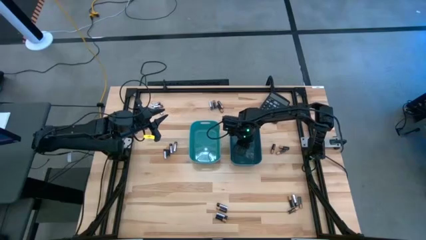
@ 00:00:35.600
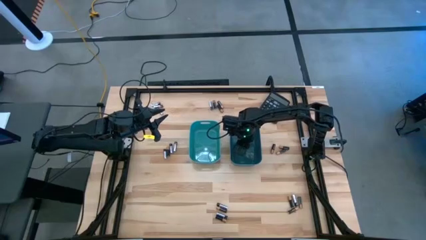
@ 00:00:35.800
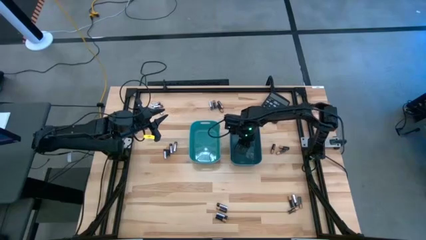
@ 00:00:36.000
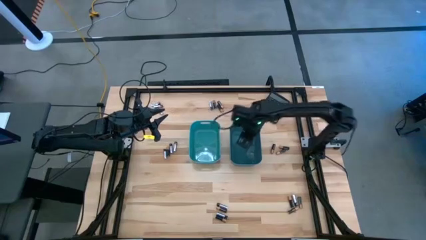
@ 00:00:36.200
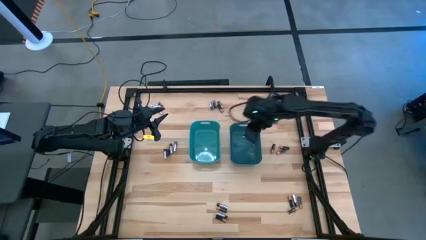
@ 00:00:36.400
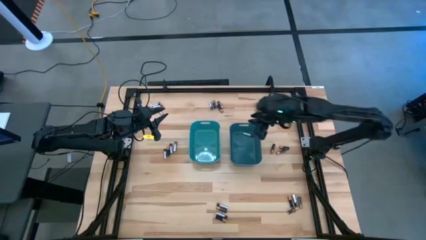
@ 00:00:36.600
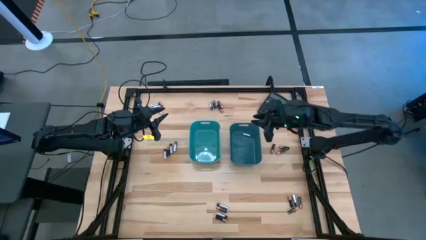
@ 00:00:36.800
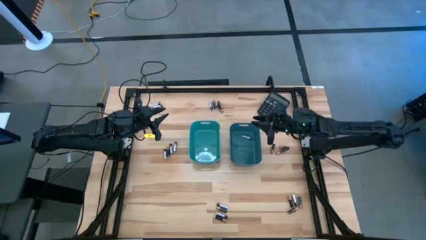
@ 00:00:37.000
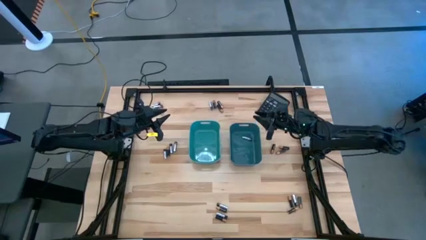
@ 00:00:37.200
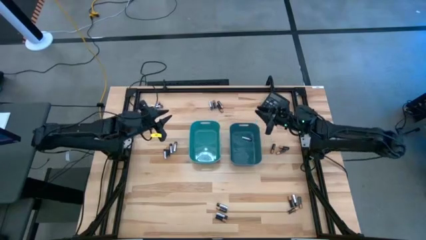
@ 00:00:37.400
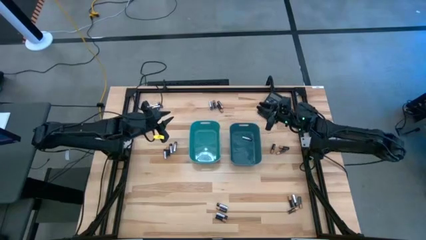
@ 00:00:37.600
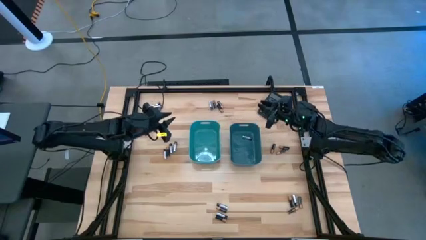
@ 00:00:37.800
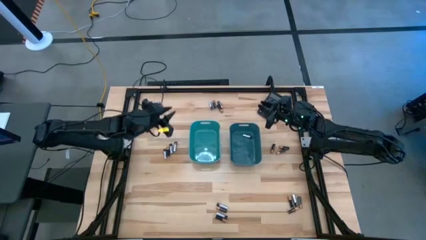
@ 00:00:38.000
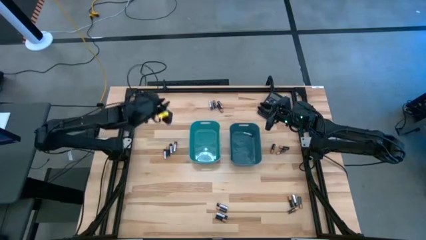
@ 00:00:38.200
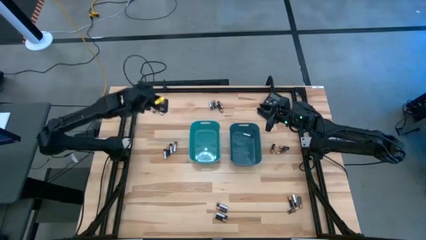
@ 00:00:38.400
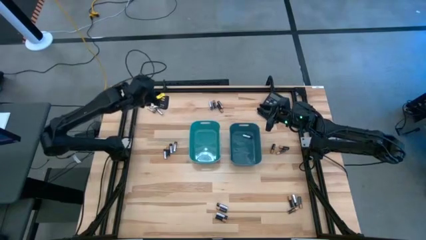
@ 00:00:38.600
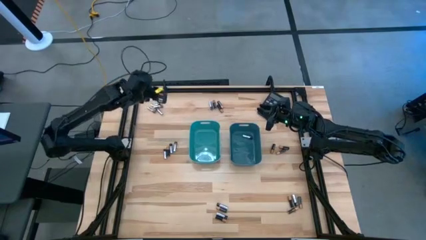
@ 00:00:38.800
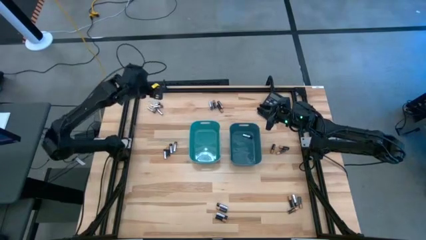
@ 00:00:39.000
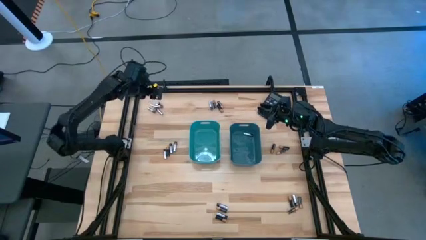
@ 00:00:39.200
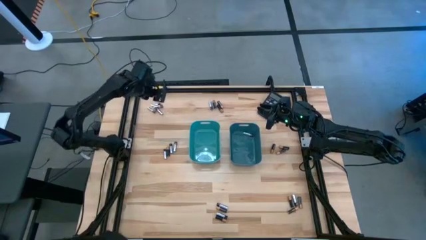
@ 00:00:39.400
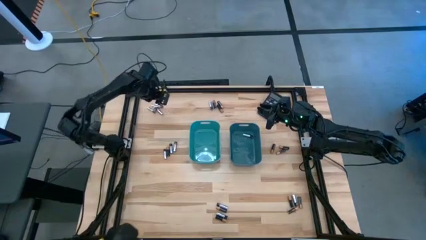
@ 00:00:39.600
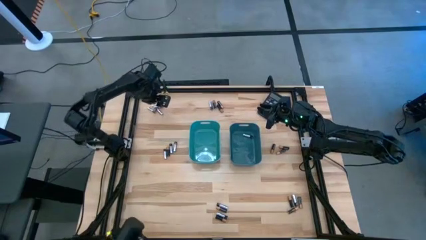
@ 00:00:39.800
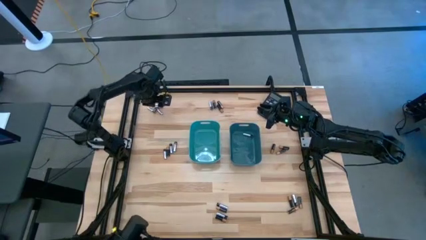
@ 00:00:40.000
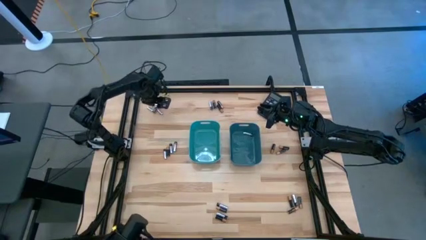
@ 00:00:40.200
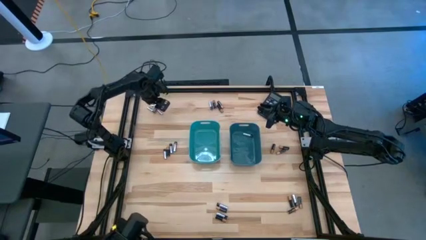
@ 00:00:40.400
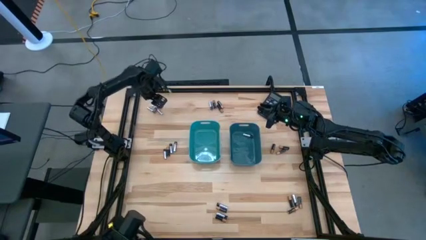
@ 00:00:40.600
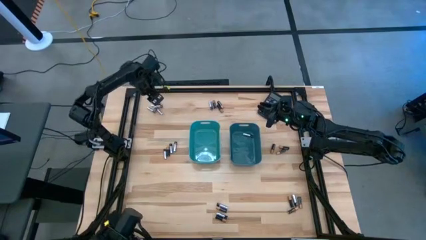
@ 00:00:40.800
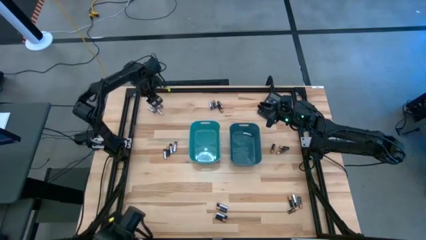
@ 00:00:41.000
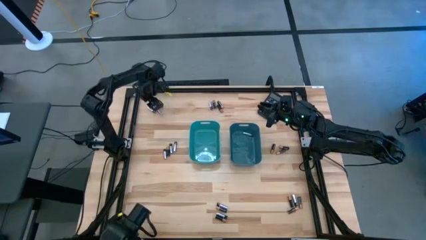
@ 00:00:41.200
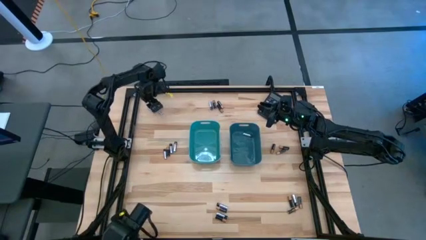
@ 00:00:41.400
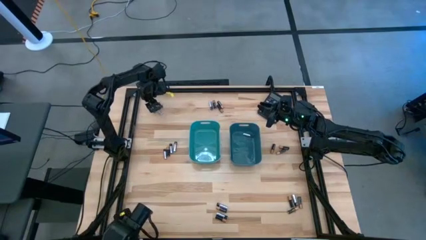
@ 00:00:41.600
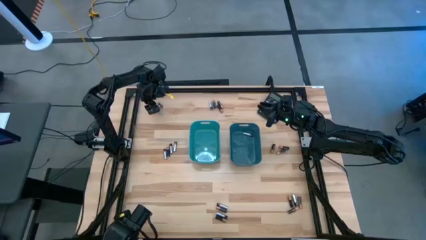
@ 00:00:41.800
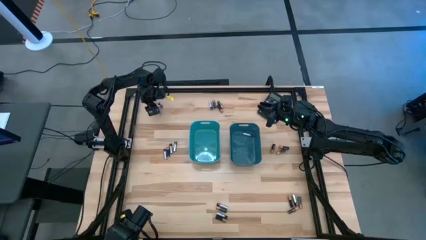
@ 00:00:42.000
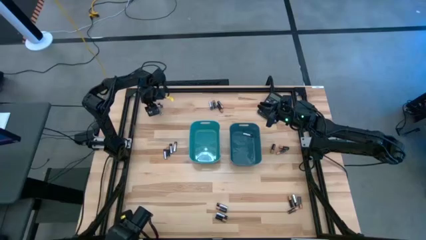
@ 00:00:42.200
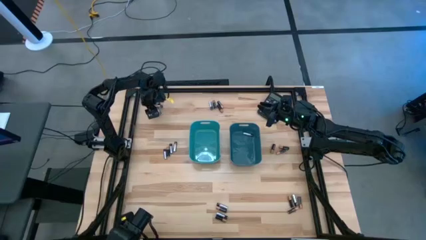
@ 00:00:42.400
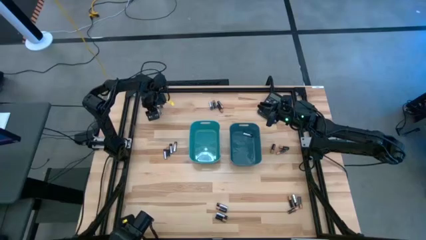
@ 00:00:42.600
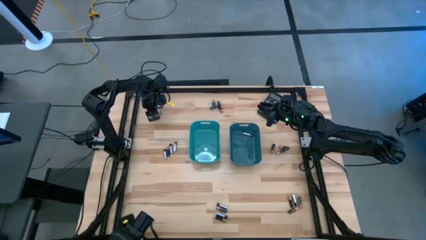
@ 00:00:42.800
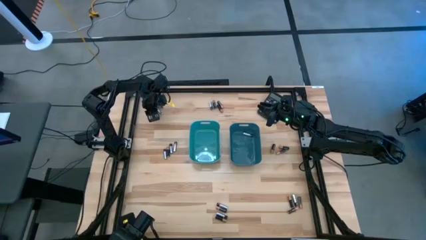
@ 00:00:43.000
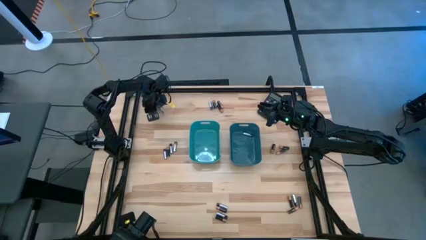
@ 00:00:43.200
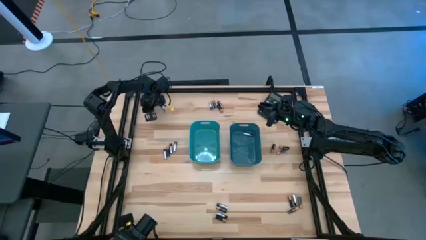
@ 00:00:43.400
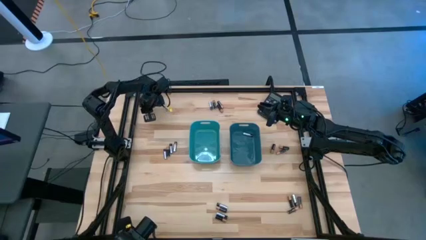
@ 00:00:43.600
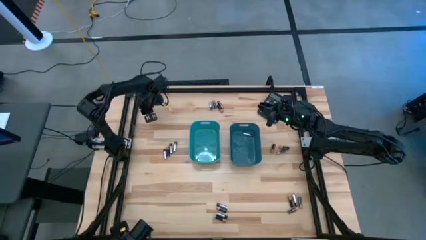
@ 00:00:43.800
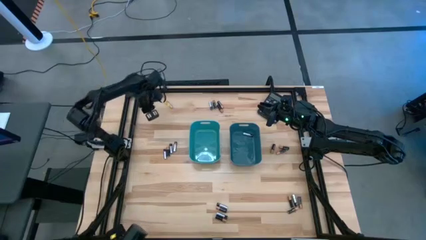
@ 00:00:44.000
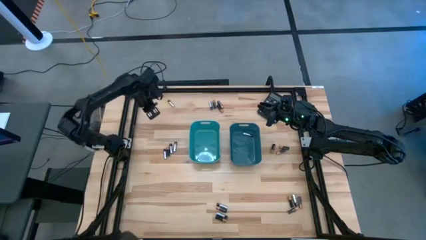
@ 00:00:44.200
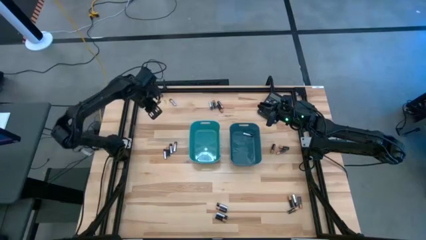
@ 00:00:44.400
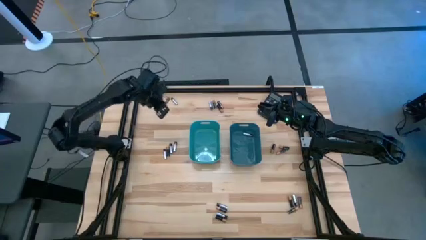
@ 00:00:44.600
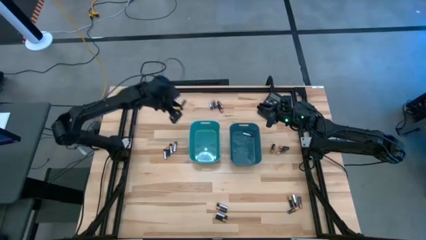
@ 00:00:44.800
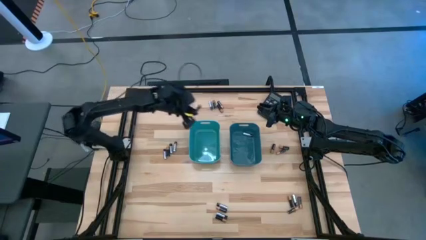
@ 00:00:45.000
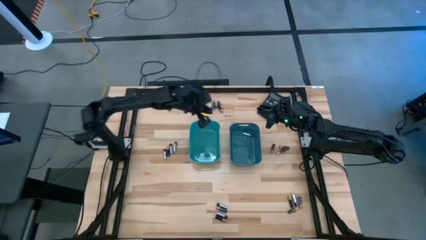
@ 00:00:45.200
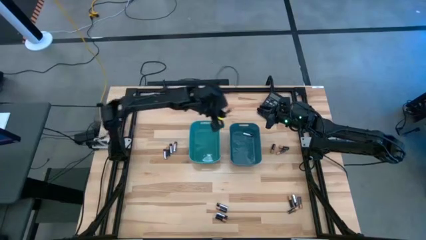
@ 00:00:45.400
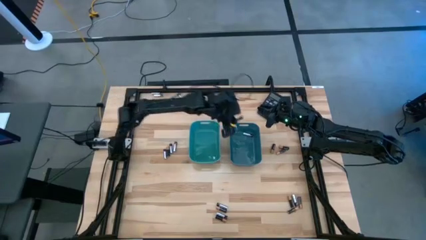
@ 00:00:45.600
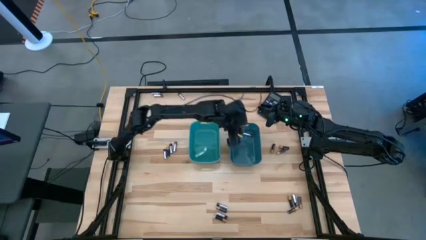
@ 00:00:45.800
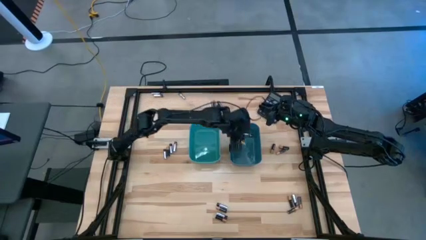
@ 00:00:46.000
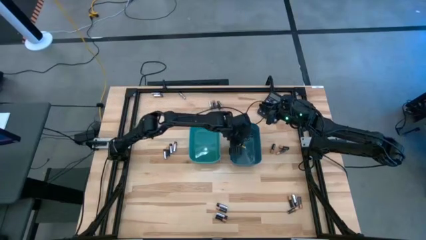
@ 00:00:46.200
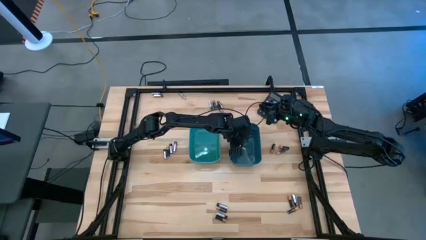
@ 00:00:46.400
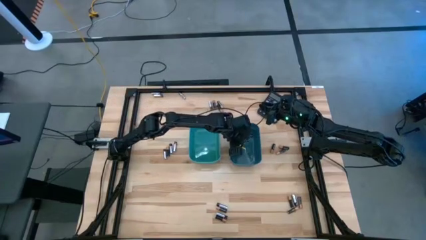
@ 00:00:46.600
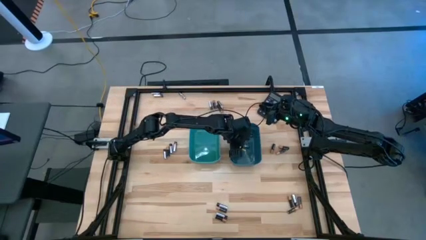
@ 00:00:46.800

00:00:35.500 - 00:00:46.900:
Task: Sort batteries
Put the silver battery into the blue bin
